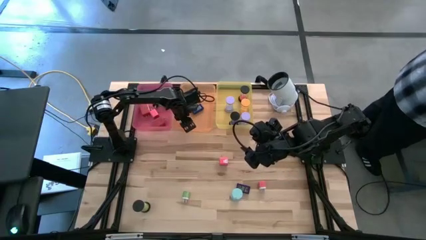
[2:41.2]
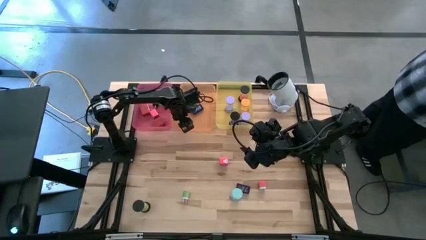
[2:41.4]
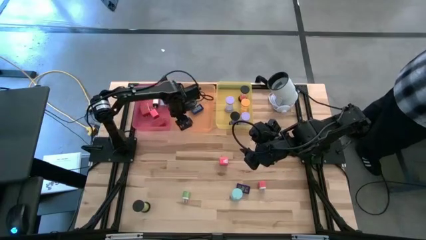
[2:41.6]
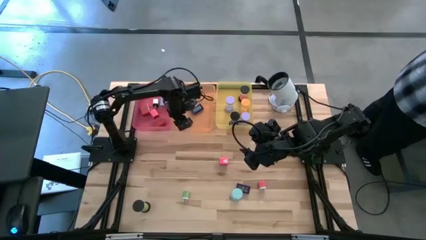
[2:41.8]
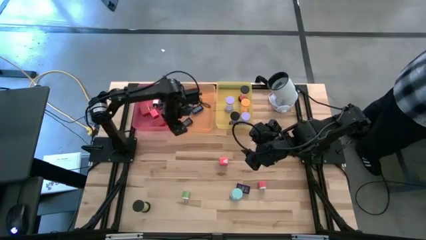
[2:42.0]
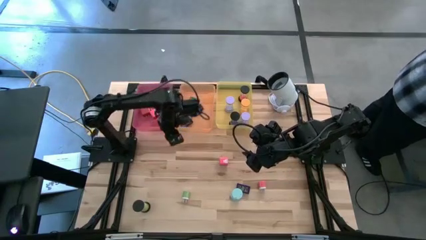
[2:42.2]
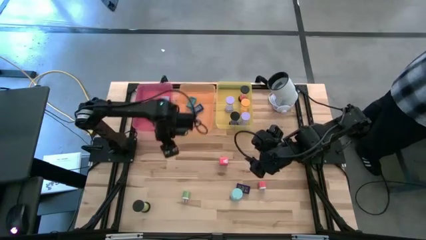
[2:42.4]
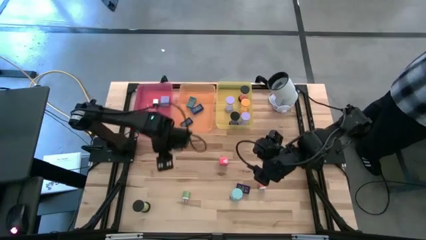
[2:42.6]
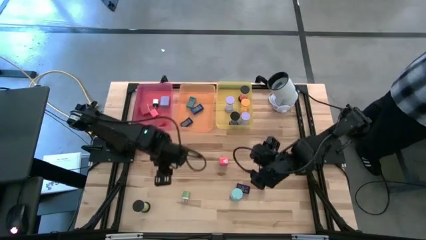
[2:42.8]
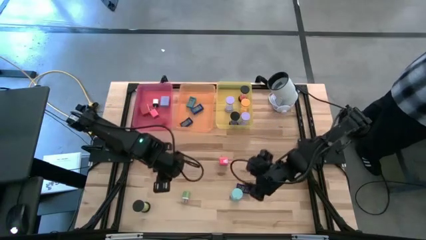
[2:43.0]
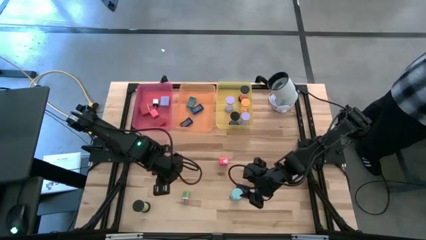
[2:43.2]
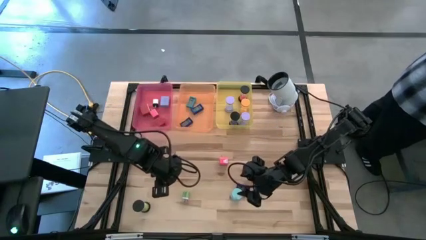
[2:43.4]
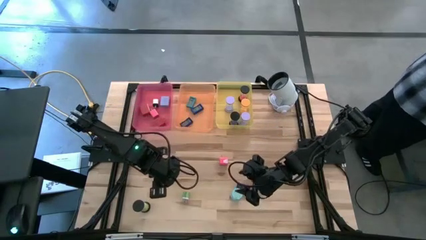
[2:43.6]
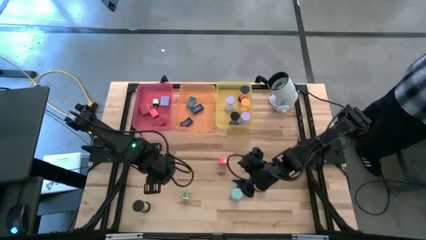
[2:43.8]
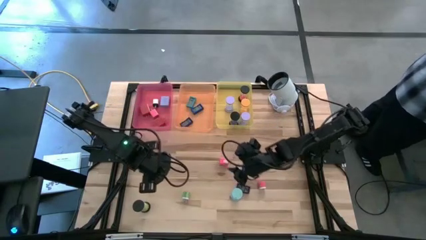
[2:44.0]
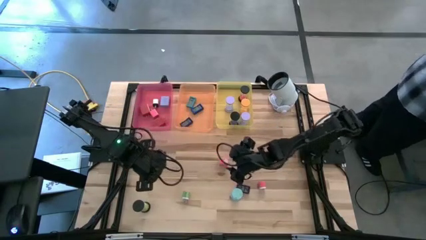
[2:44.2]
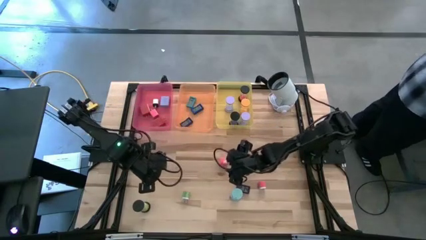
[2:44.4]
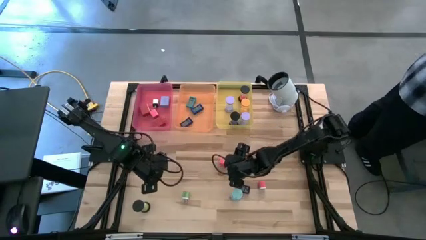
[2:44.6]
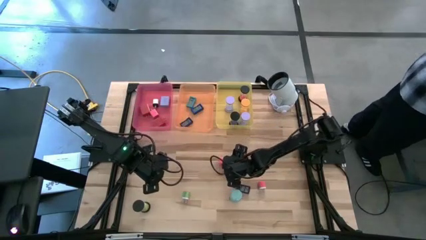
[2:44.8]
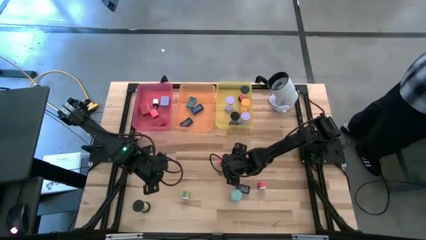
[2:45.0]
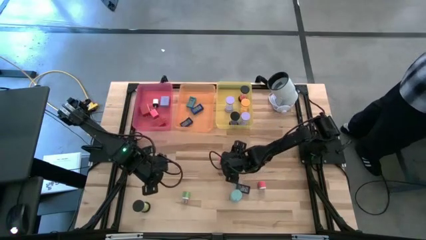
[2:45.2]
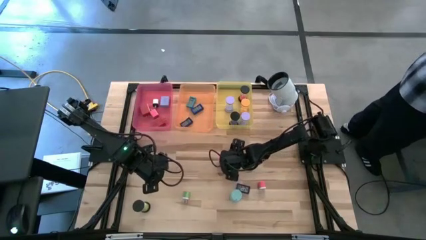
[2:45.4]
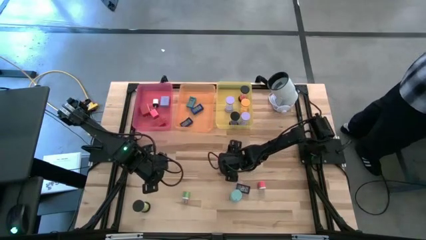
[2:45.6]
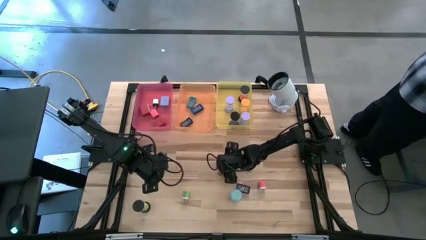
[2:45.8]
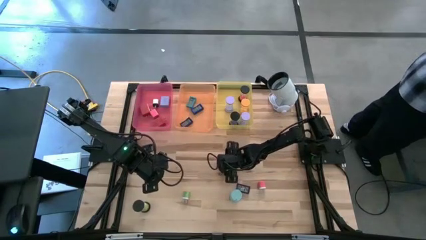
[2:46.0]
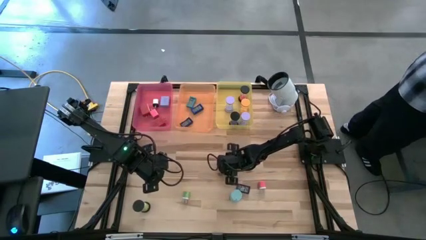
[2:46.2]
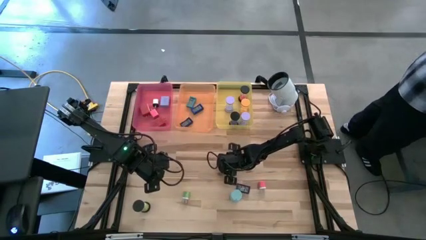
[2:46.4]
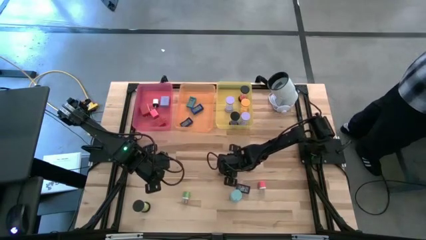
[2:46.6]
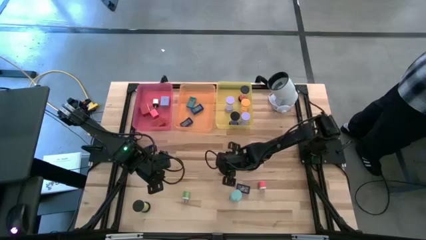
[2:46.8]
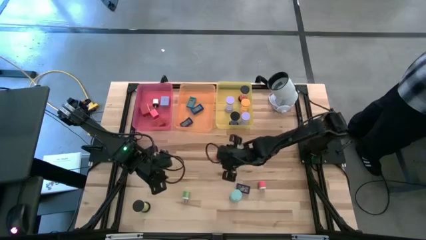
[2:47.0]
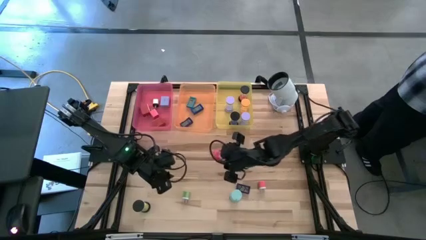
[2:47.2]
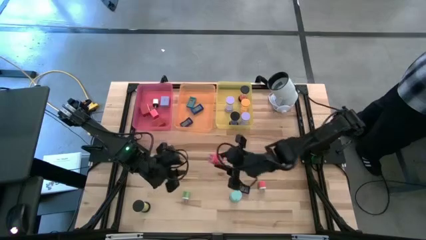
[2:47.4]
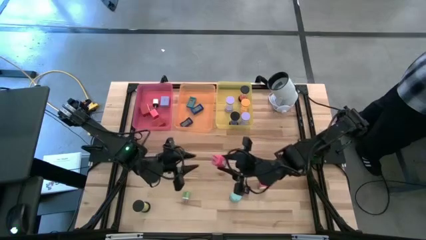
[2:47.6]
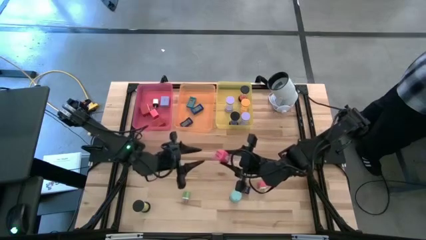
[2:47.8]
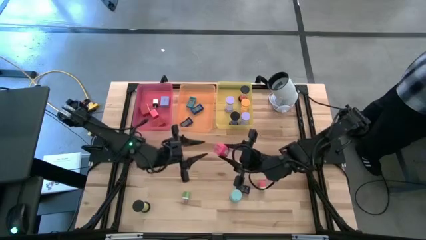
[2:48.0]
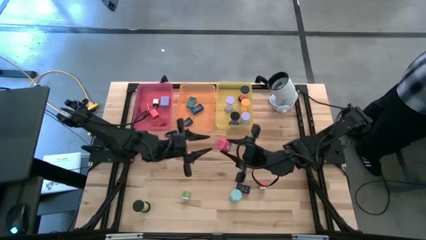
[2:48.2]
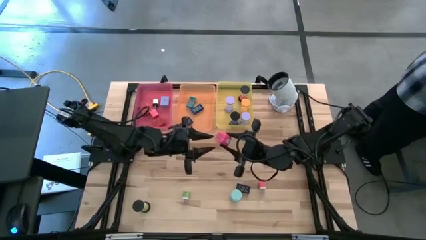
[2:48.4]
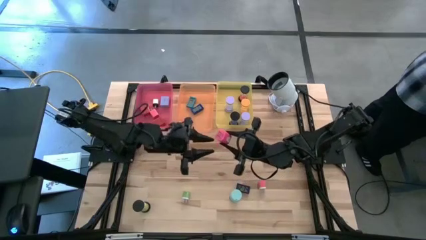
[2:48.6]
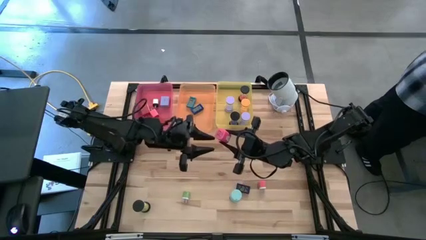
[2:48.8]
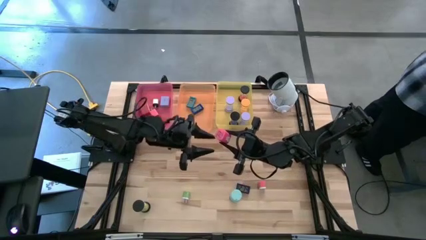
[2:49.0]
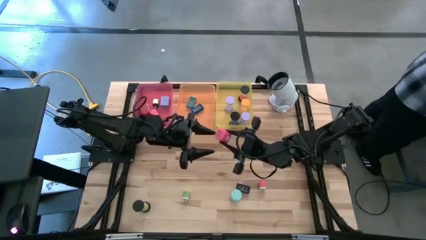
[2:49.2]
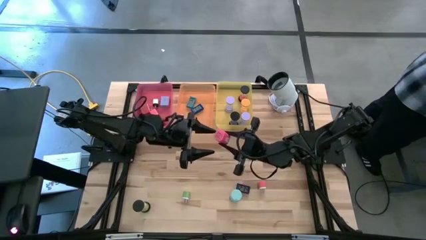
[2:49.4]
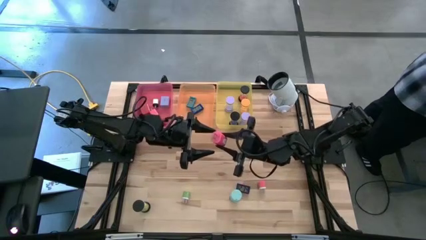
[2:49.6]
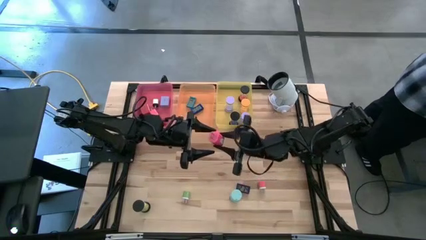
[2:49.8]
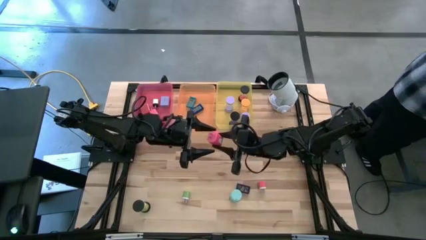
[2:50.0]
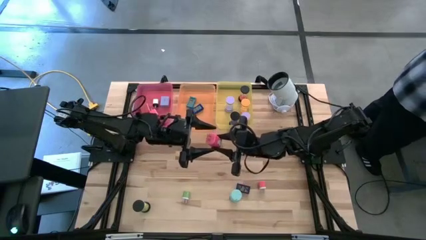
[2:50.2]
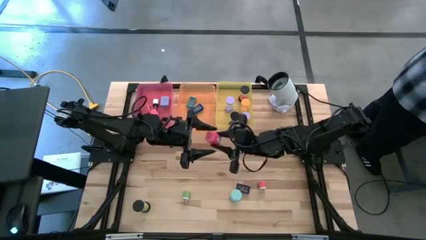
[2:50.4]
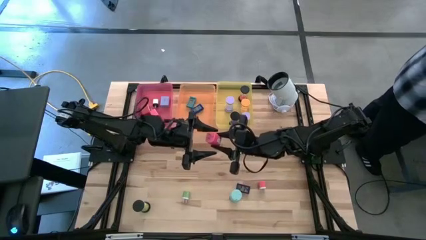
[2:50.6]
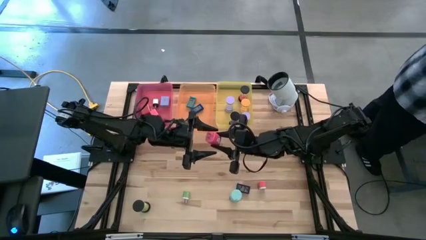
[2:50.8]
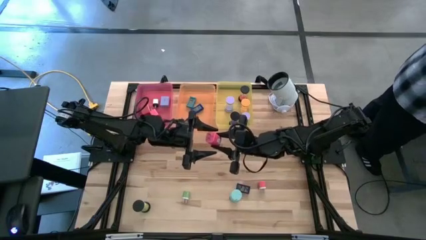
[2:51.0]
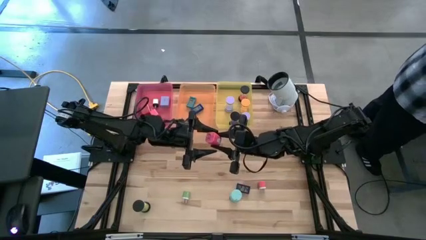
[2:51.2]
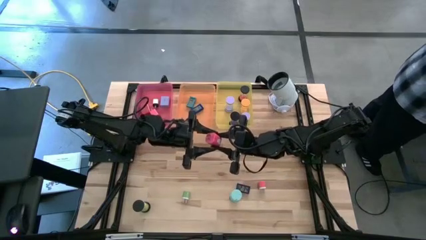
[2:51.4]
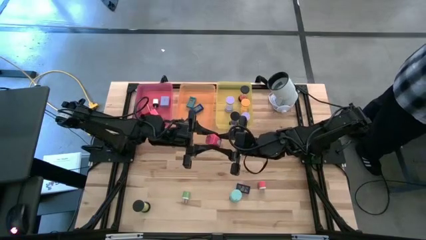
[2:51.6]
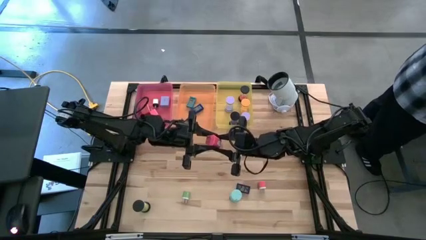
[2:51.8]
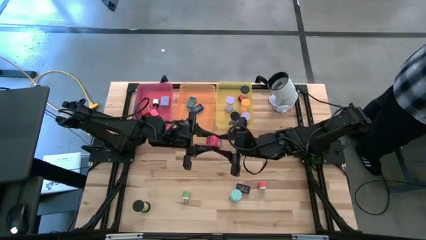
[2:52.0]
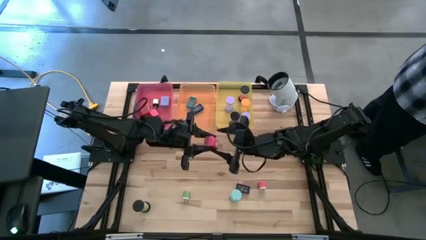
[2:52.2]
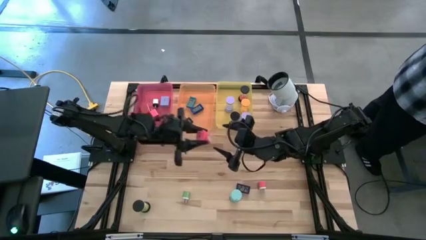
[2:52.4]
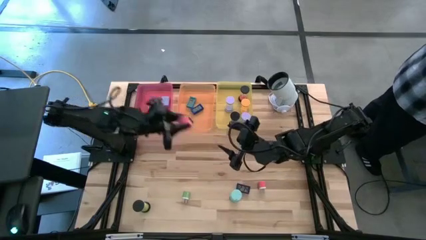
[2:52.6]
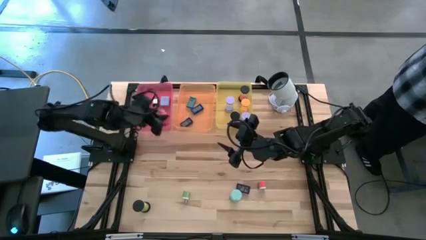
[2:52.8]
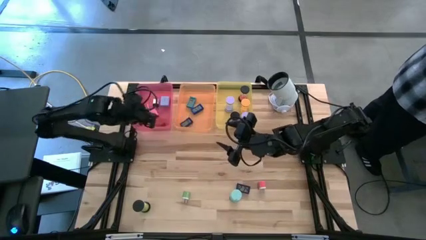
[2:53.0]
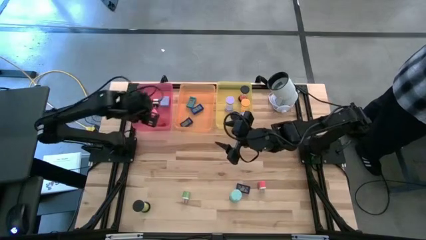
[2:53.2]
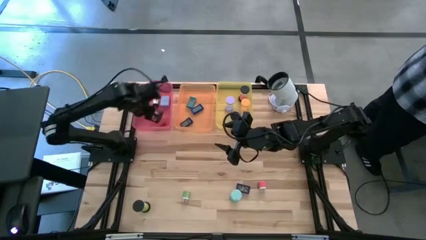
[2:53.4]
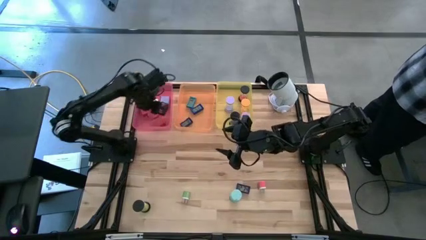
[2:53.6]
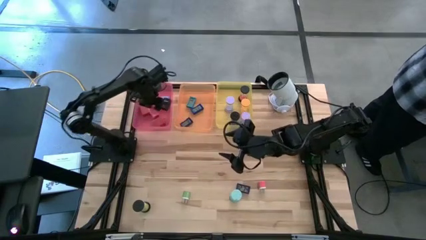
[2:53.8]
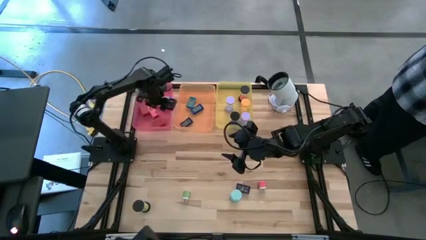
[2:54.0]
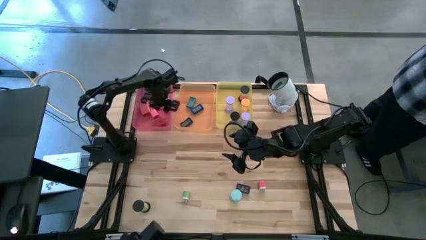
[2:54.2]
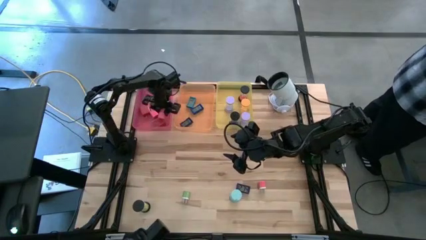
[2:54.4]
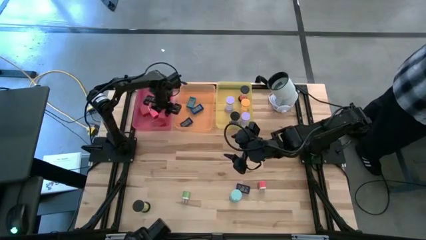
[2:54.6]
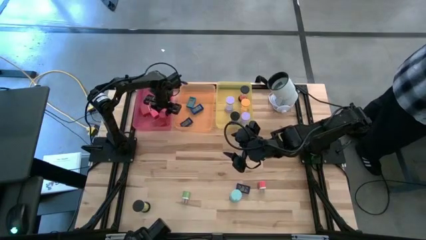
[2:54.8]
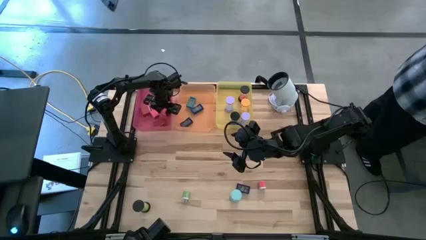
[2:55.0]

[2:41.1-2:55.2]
Task: Pick & Place Office items
Put the pink charger adapter into the red bin

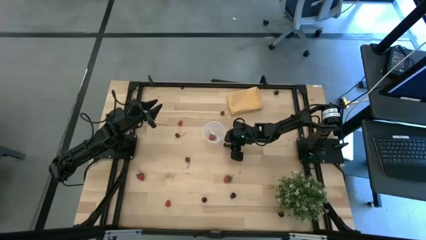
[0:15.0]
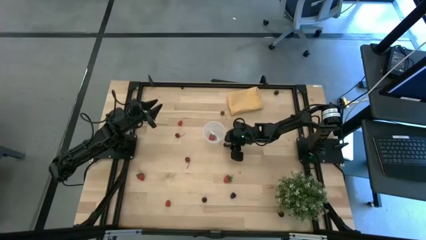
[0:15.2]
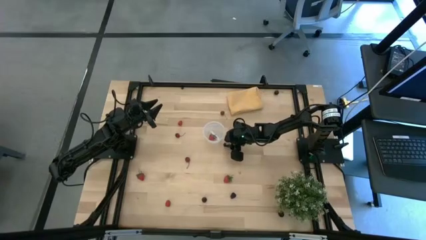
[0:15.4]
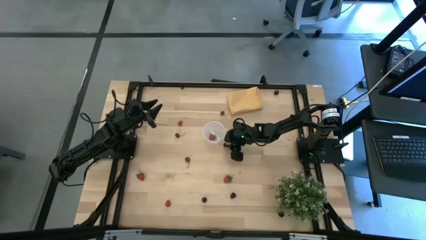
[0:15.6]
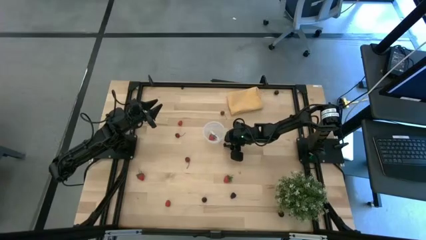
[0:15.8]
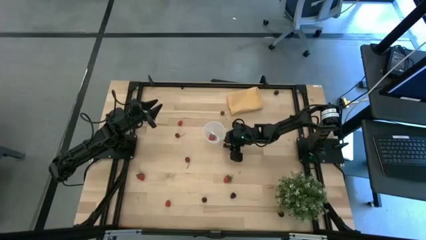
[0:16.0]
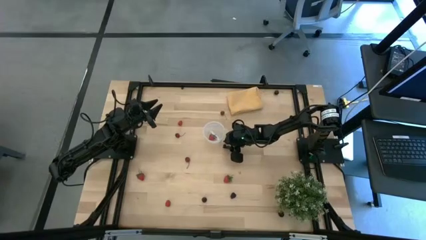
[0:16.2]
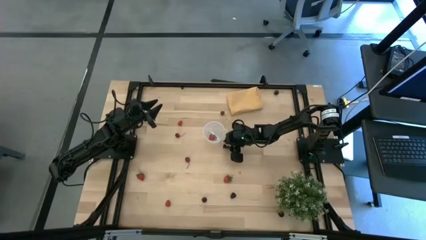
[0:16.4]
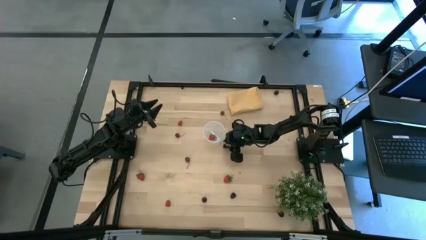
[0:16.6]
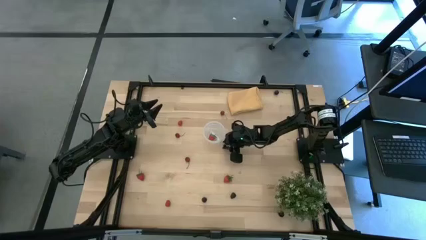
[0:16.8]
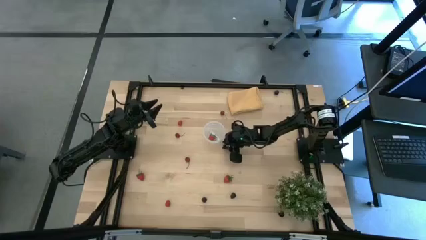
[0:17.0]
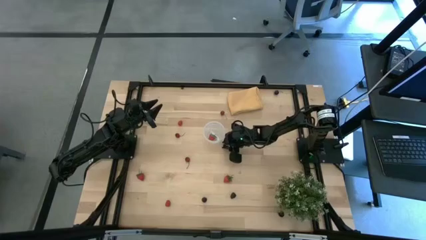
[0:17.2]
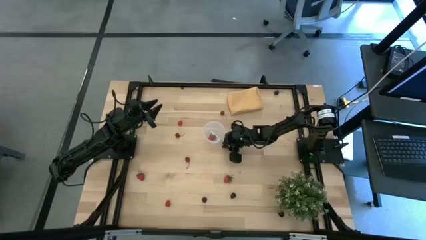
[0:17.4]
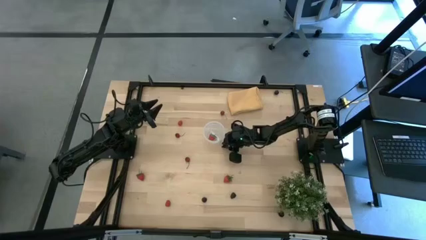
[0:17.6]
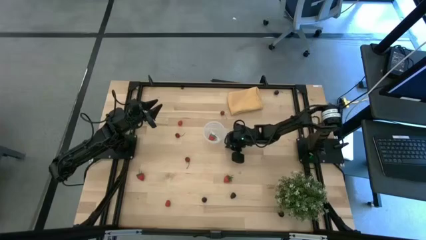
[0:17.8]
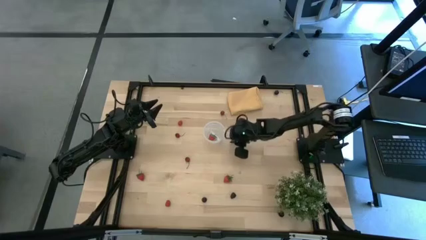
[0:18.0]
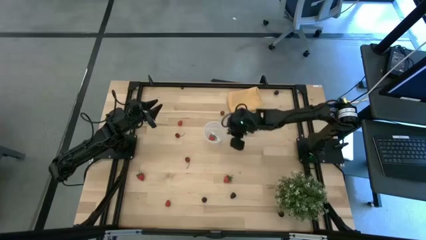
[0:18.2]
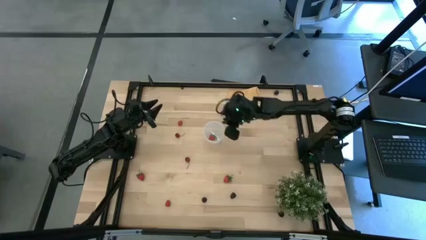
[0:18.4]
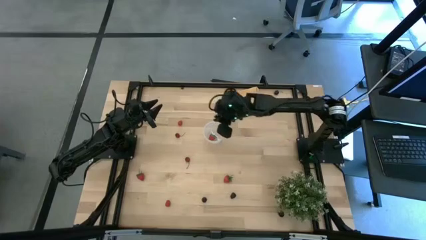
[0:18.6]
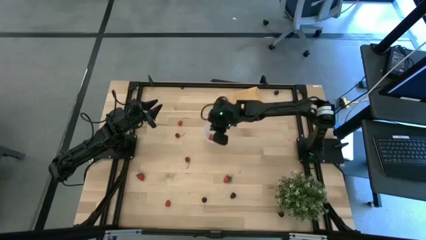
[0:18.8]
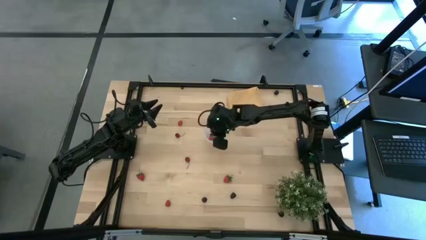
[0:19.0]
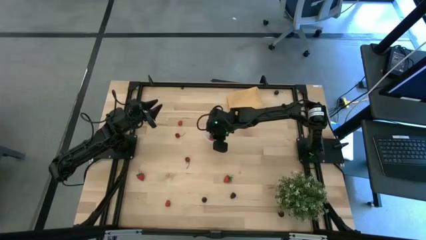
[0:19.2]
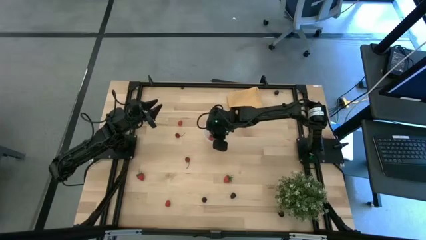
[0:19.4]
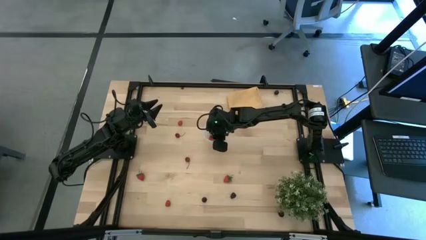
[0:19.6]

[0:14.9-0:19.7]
Task: Pick and placing Produce into tupperware
Put the bottom blueberry into the transparent container
